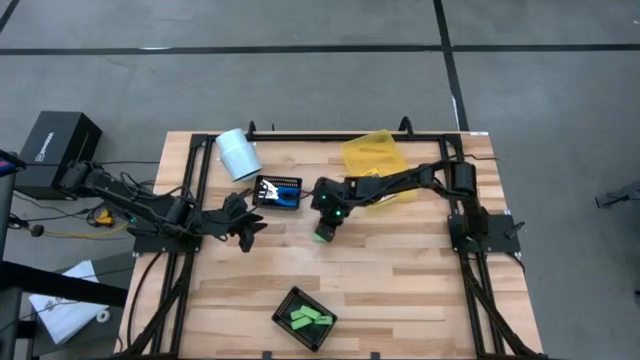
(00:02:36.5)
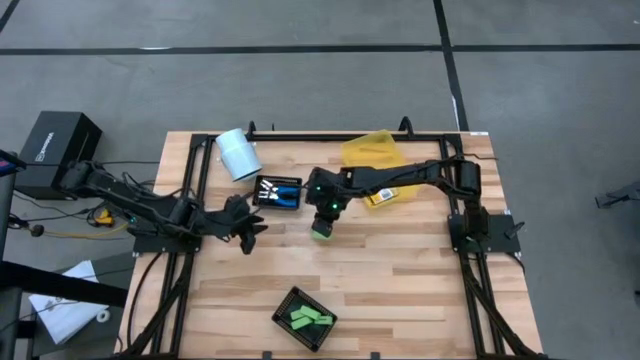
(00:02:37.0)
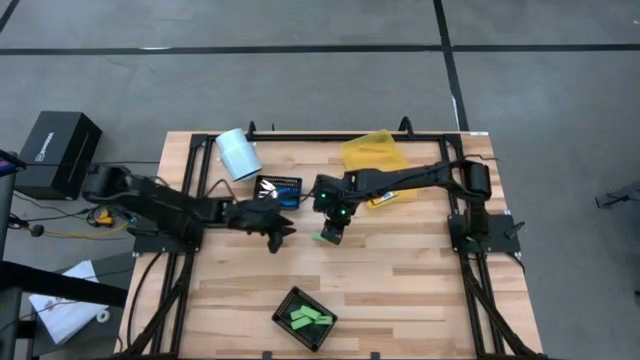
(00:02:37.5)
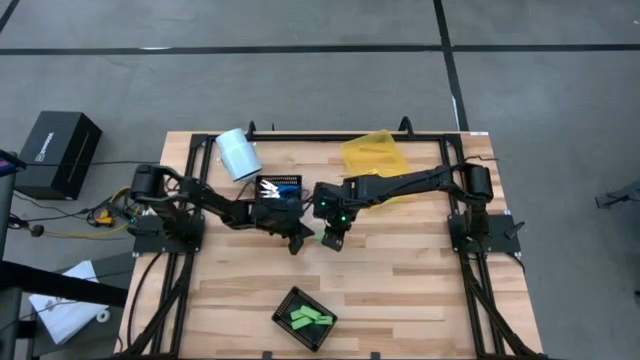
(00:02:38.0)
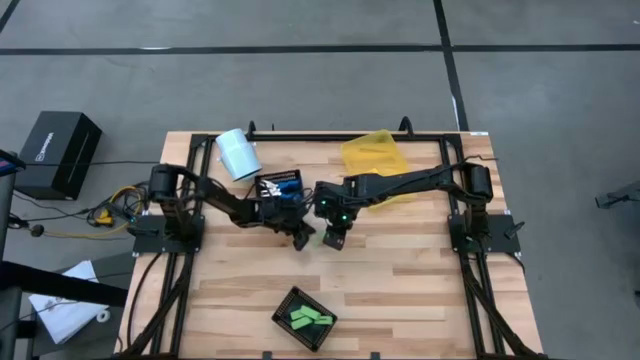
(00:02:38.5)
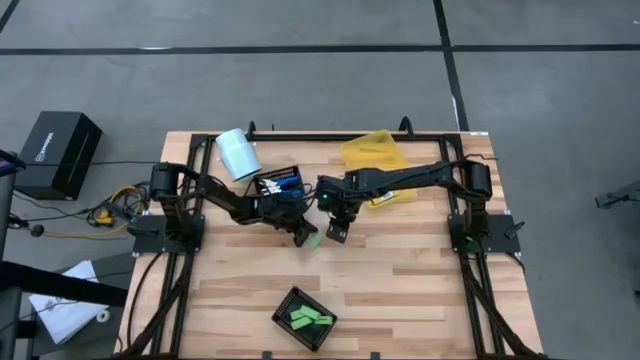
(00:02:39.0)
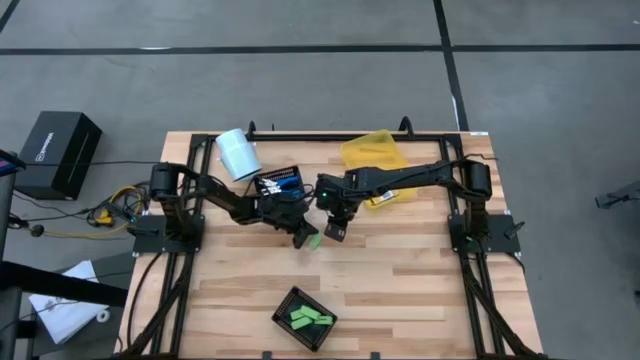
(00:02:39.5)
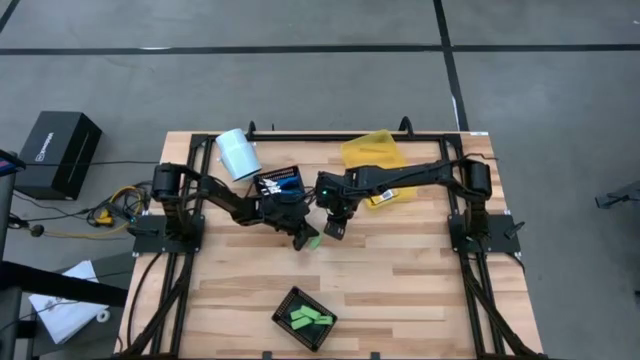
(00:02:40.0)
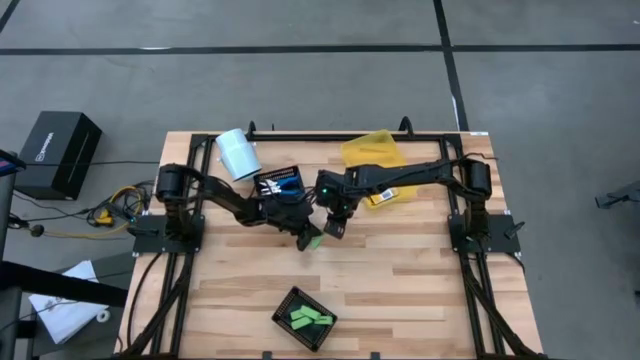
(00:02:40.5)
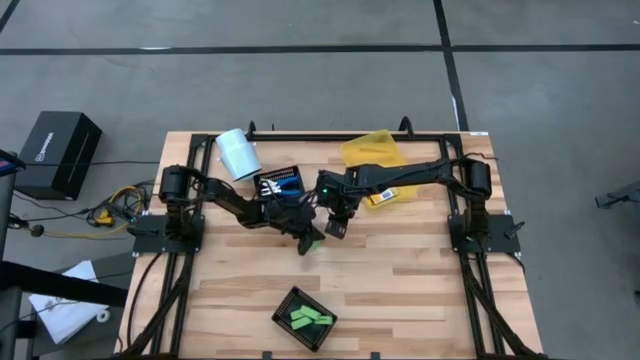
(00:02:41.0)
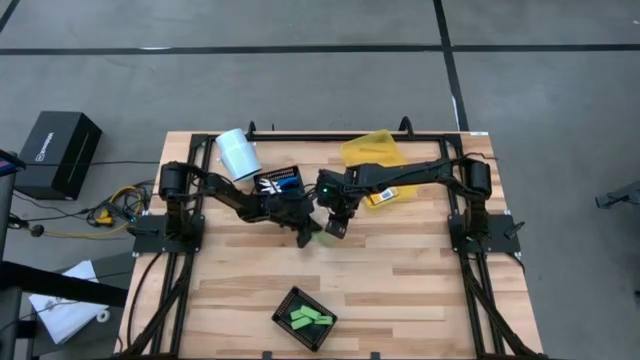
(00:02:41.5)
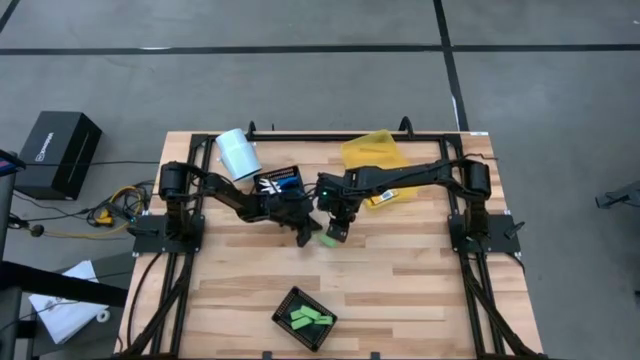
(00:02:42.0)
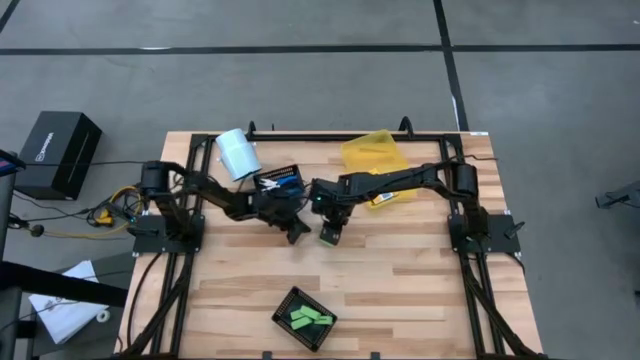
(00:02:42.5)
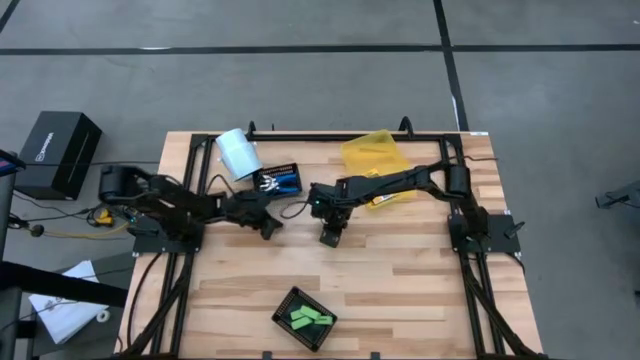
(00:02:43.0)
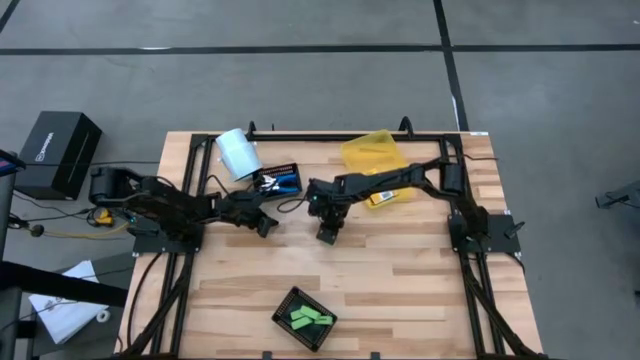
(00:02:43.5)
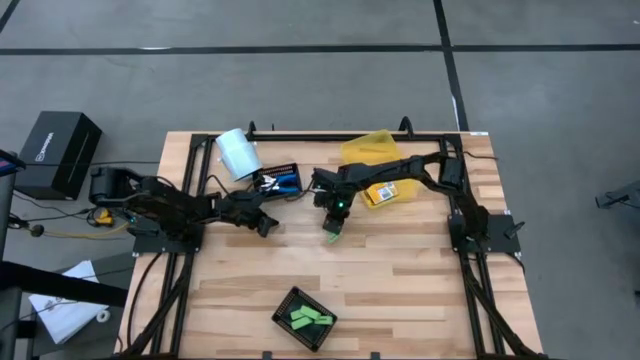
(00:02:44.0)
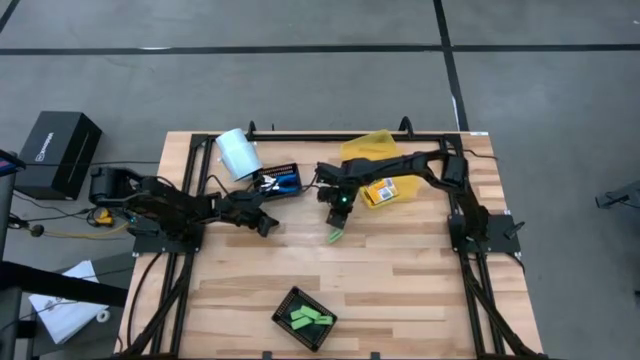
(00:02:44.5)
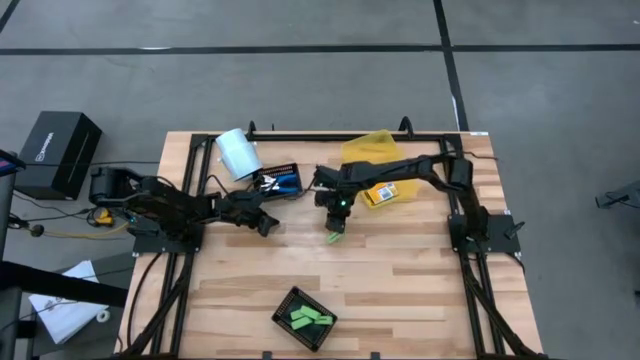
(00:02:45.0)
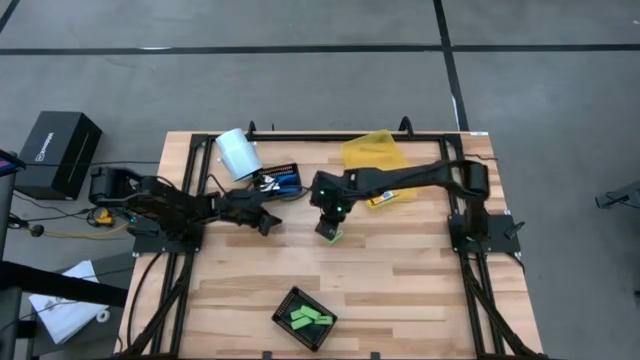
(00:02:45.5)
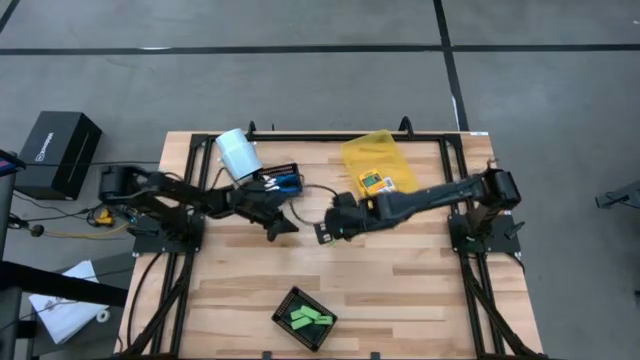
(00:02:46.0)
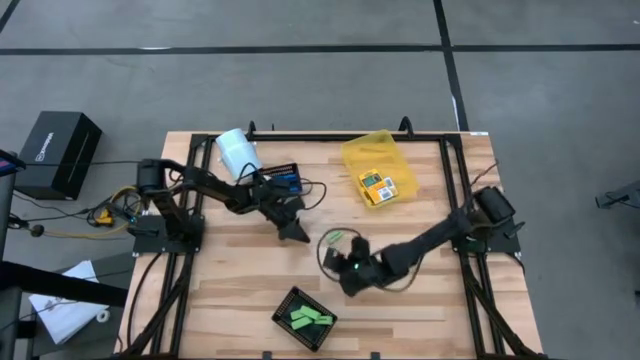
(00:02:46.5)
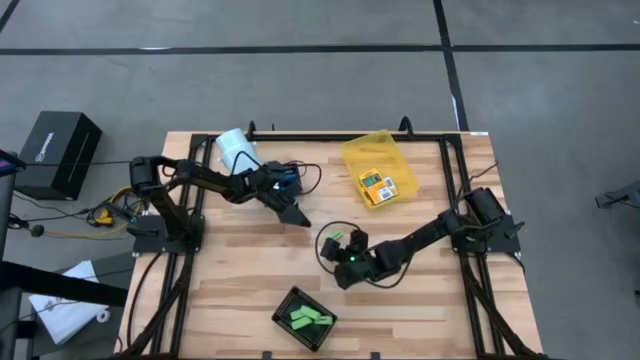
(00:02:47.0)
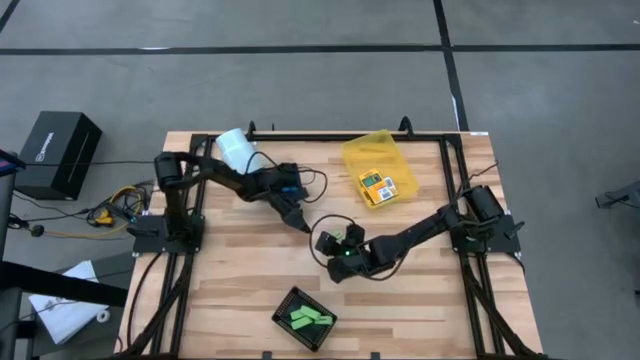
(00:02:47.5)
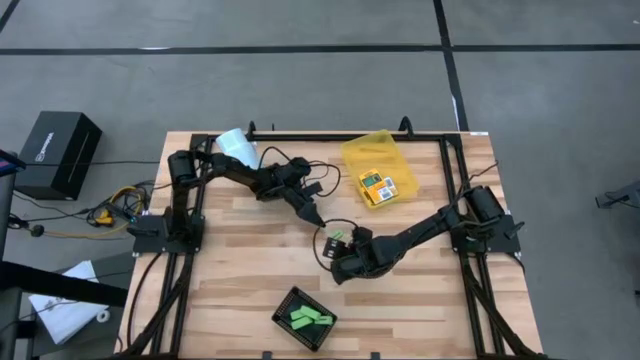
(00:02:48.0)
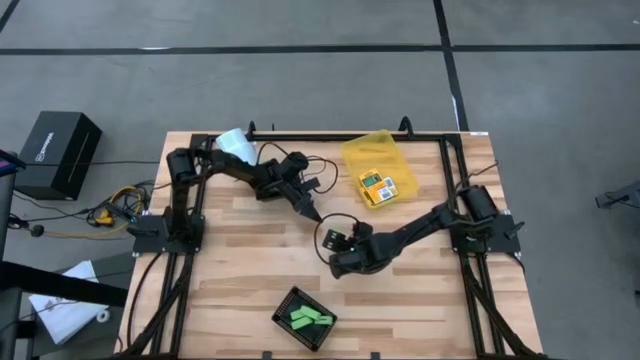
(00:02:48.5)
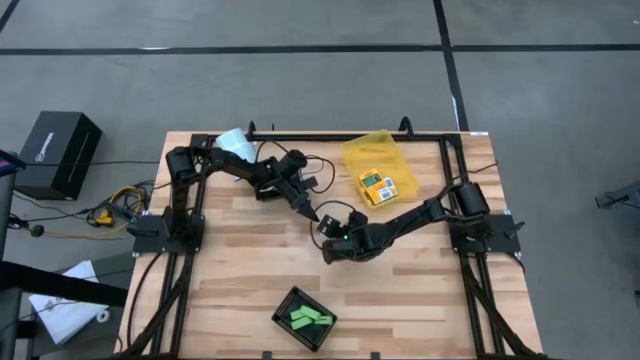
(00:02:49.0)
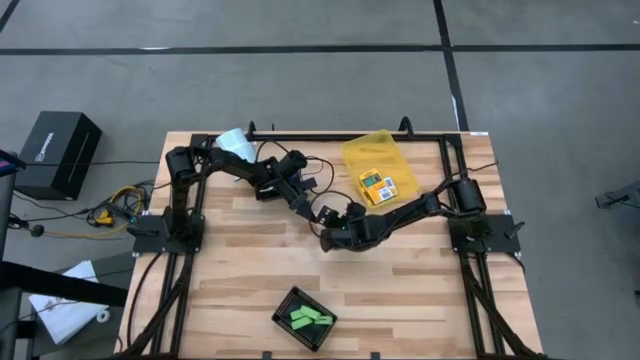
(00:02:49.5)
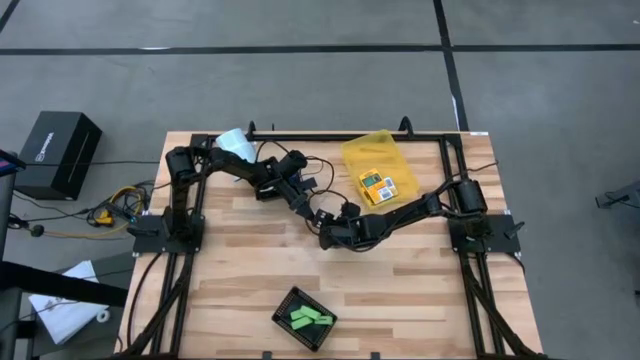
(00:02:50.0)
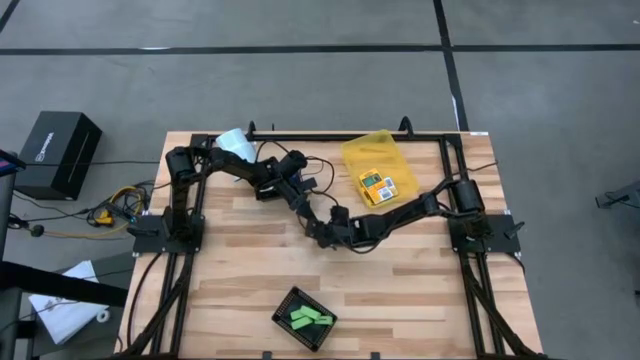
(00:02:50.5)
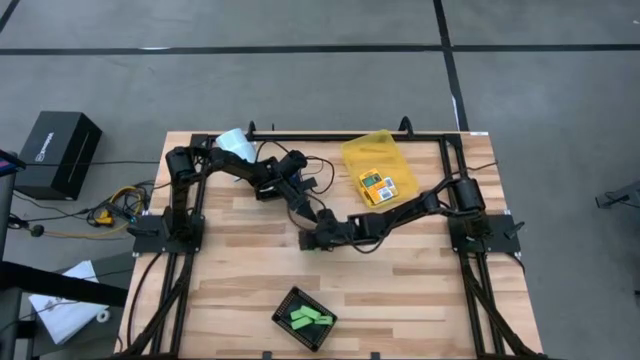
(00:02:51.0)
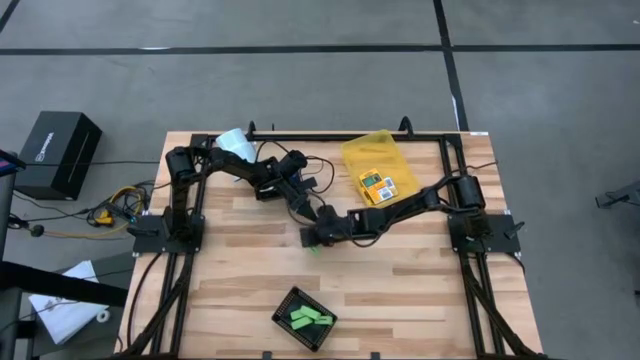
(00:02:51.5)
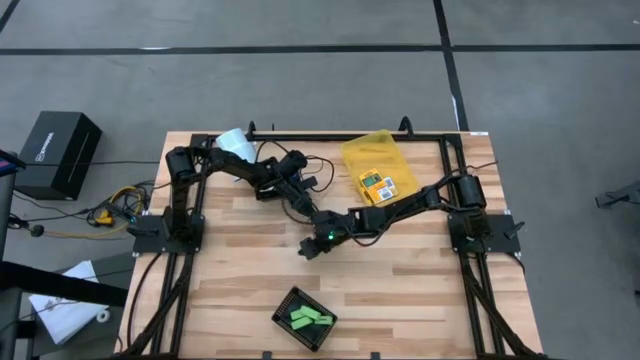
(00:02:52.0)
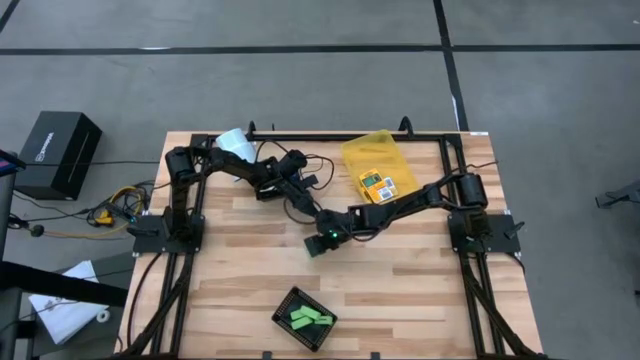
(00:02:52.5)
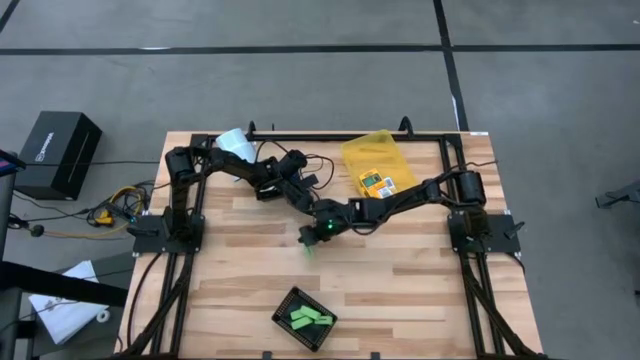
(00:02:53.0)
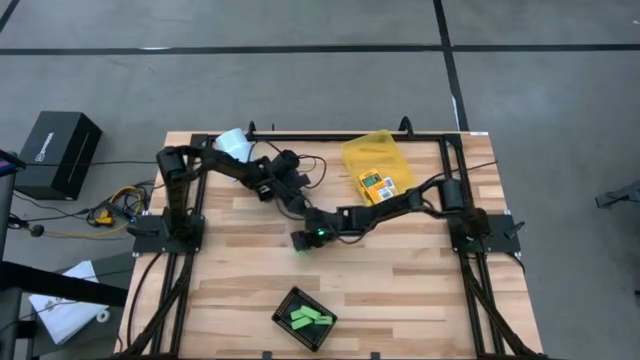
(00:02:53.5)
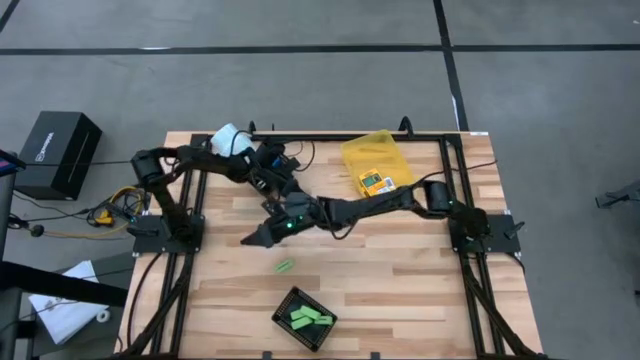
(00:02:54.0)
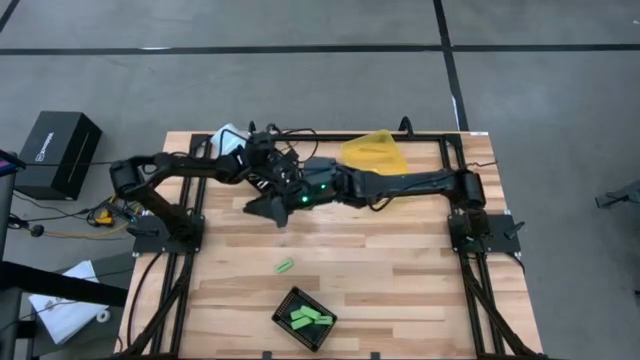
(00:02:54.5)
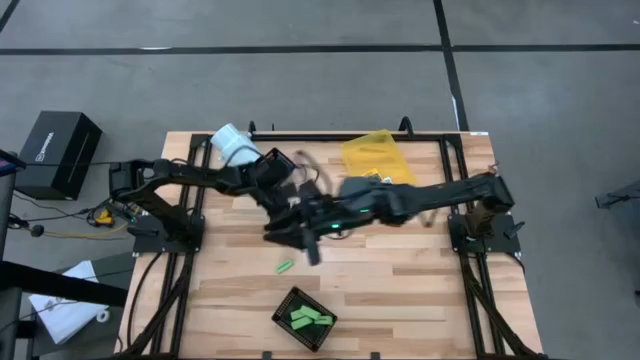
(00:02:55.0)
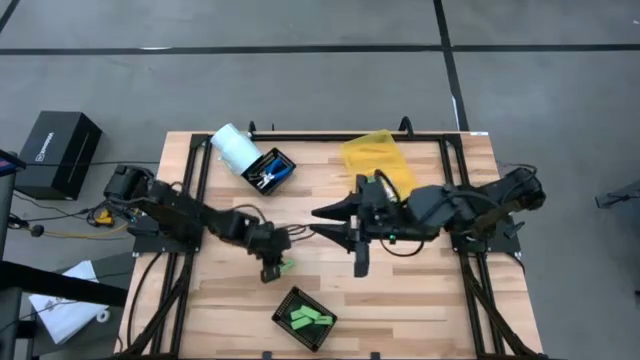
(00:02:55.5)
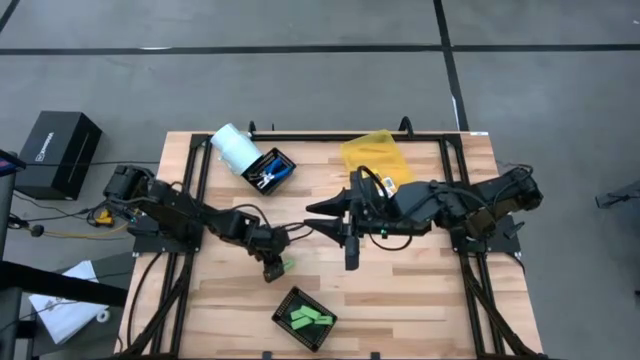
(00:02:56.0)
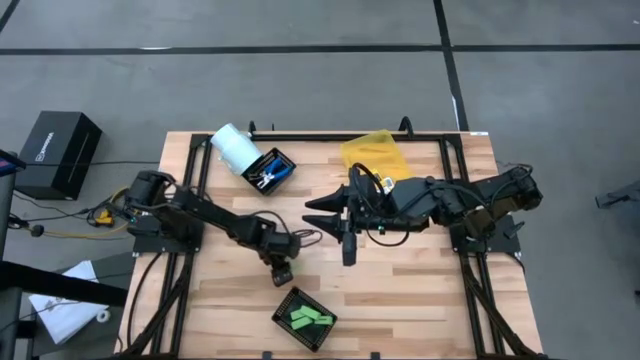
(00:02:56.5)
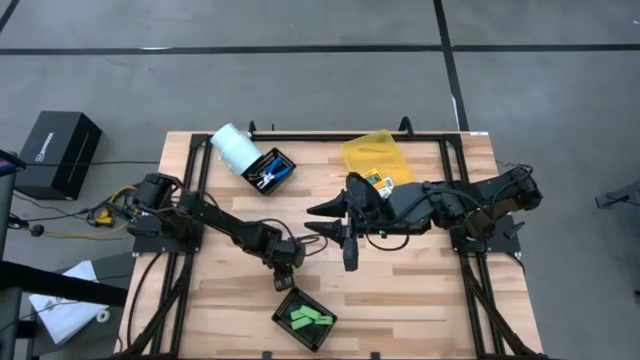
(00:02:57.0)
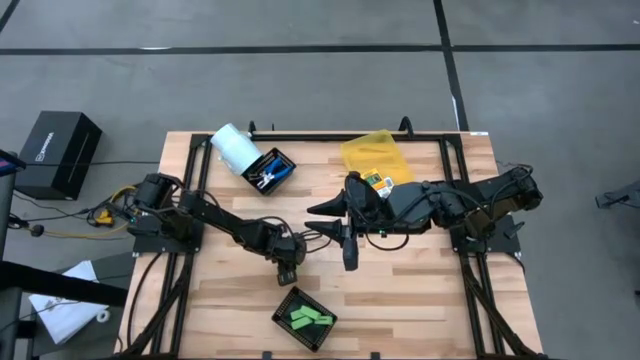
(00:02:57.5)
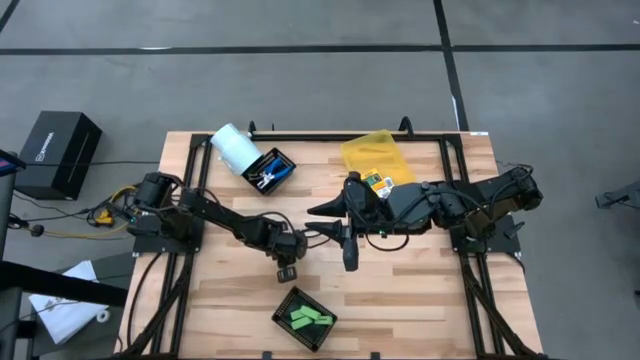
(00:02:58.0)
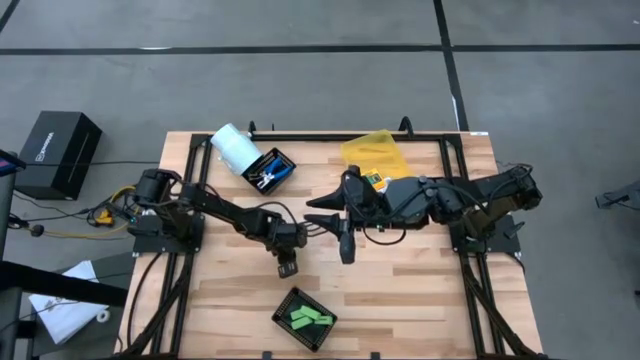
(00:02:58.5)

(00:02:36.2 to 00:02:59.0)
Task: Pick & Place School Supplies
Put the green eraser into the bottom black bin
